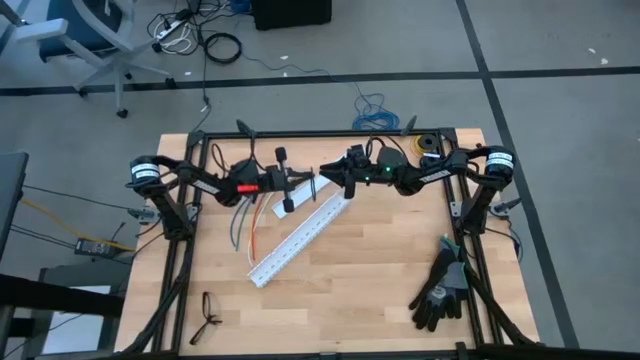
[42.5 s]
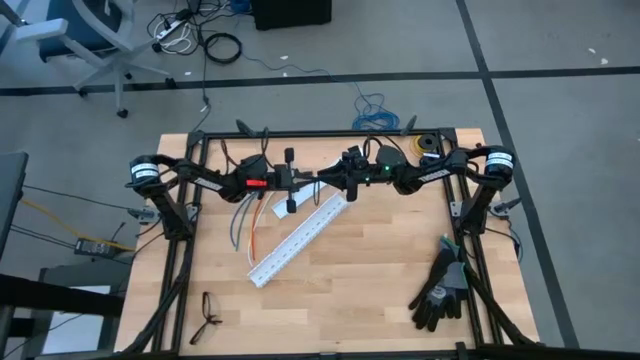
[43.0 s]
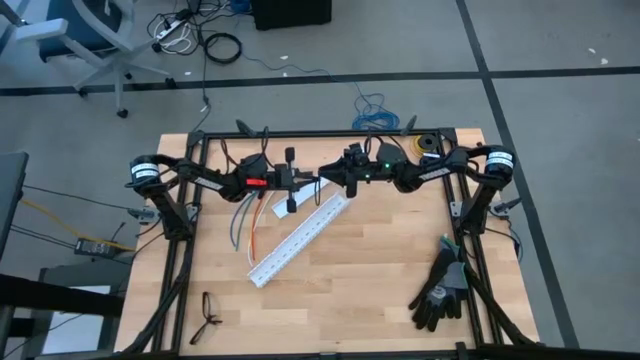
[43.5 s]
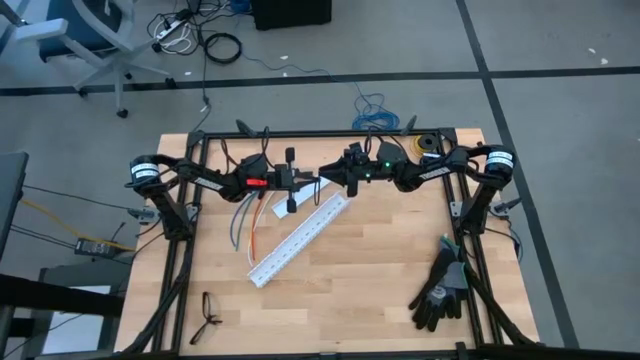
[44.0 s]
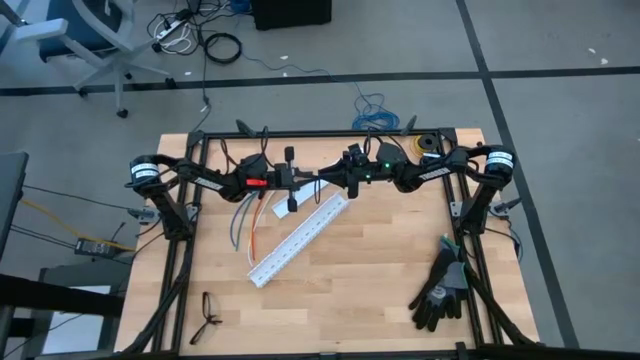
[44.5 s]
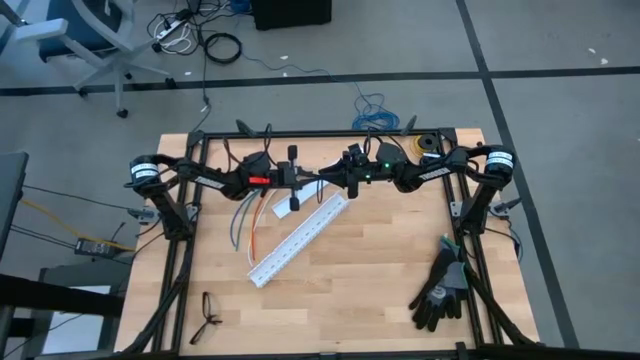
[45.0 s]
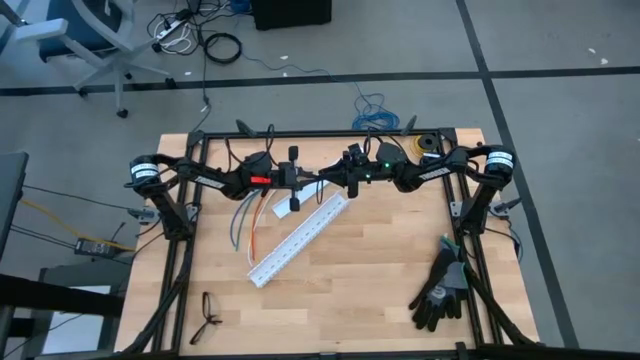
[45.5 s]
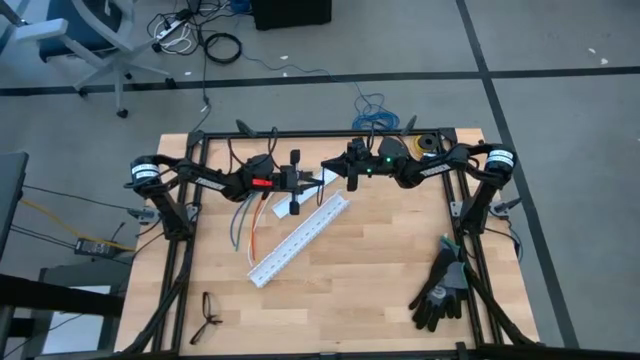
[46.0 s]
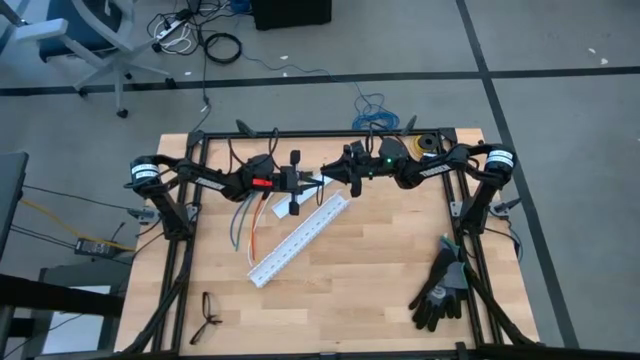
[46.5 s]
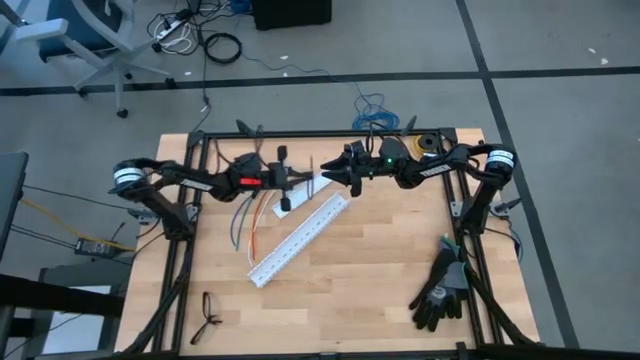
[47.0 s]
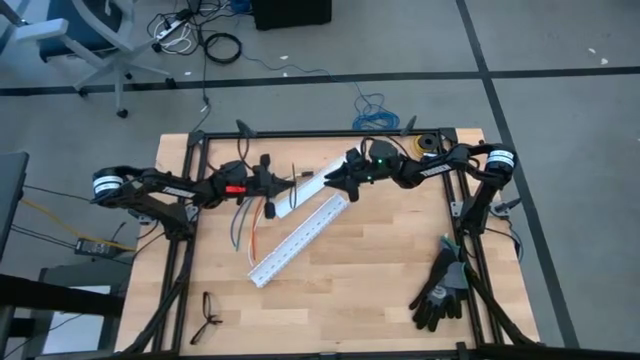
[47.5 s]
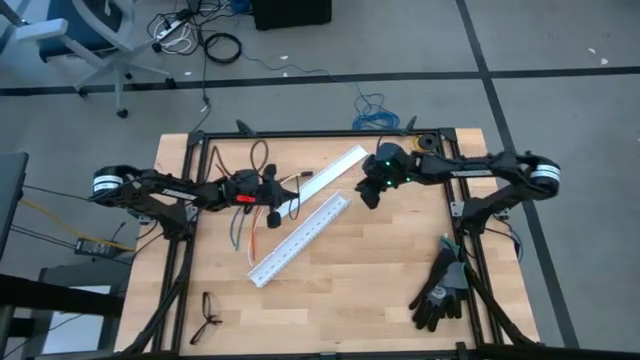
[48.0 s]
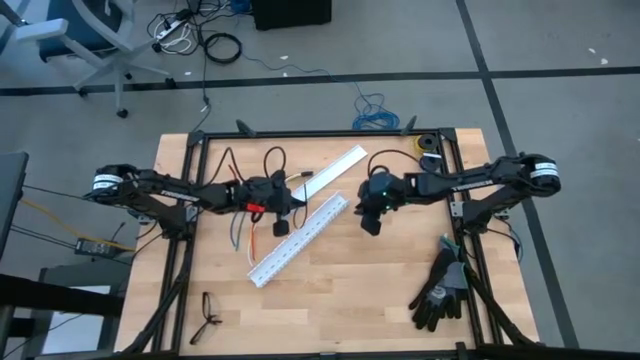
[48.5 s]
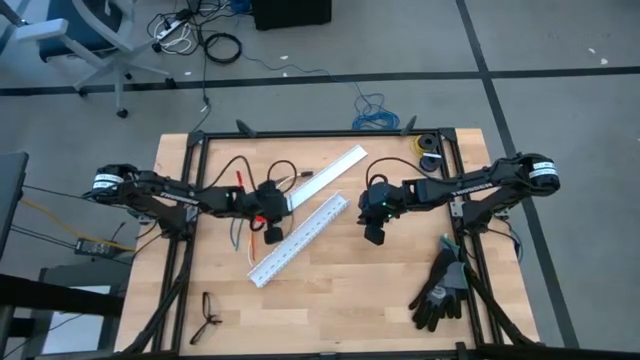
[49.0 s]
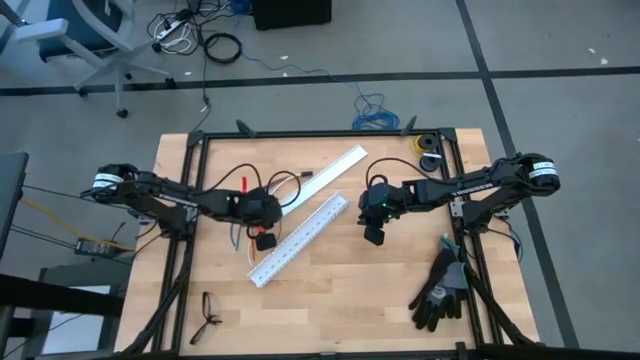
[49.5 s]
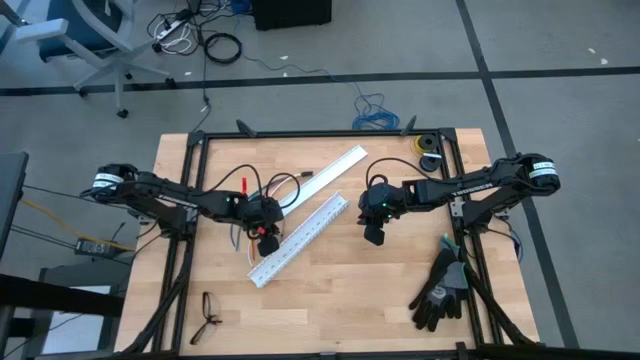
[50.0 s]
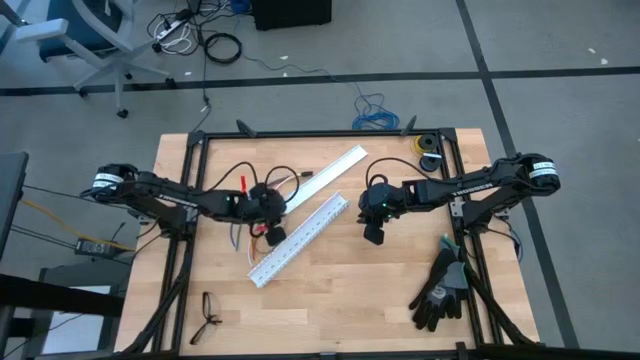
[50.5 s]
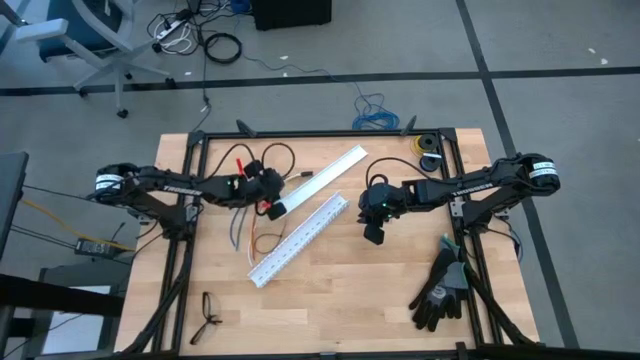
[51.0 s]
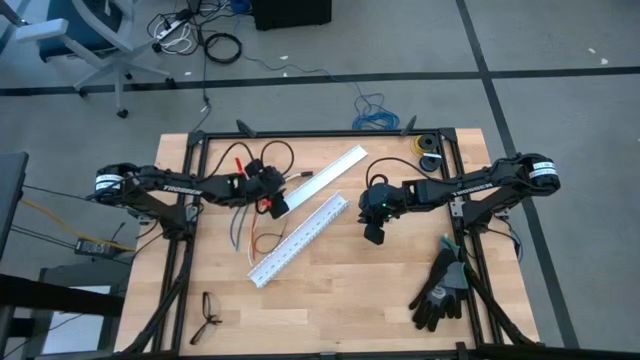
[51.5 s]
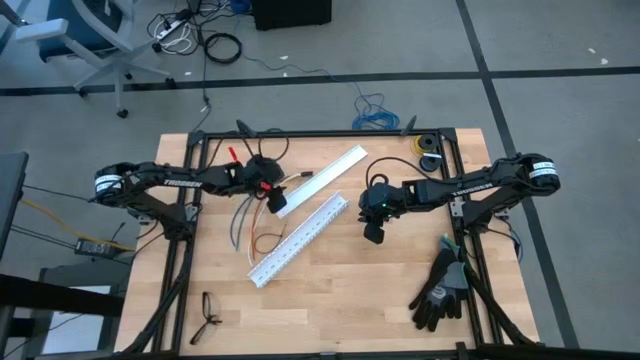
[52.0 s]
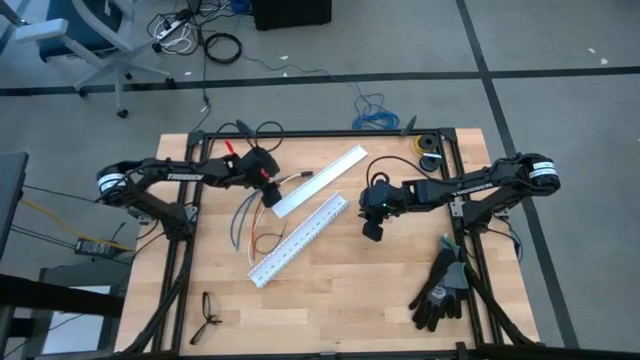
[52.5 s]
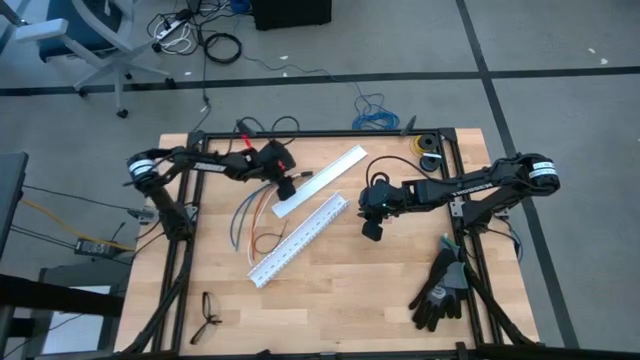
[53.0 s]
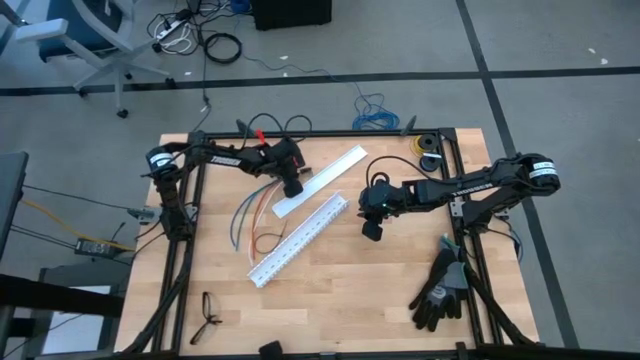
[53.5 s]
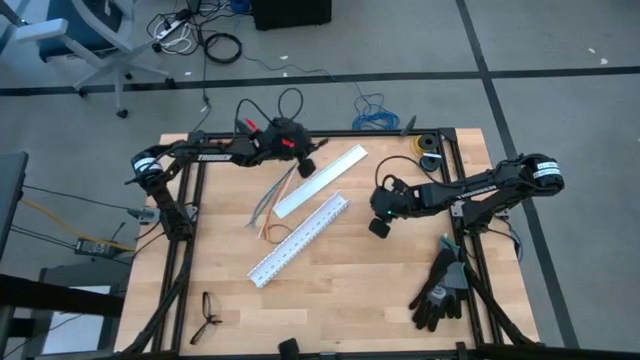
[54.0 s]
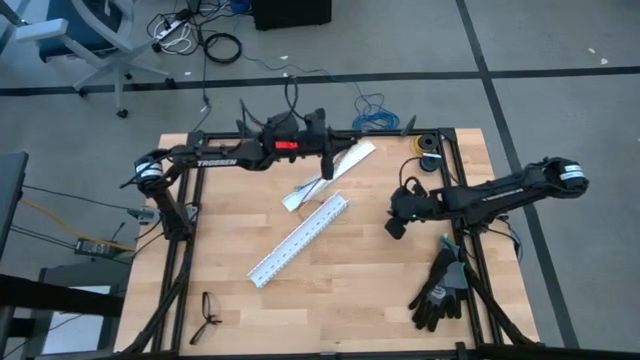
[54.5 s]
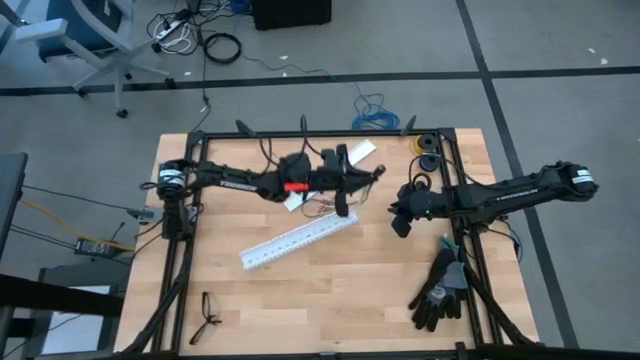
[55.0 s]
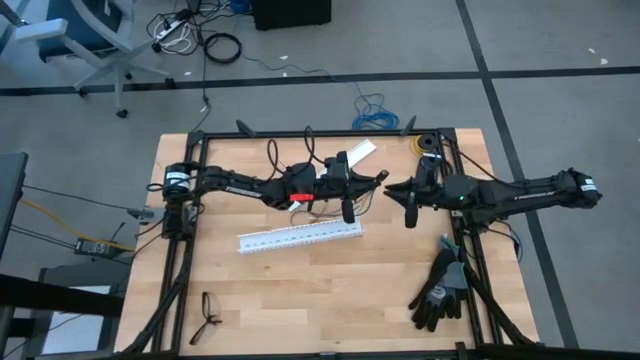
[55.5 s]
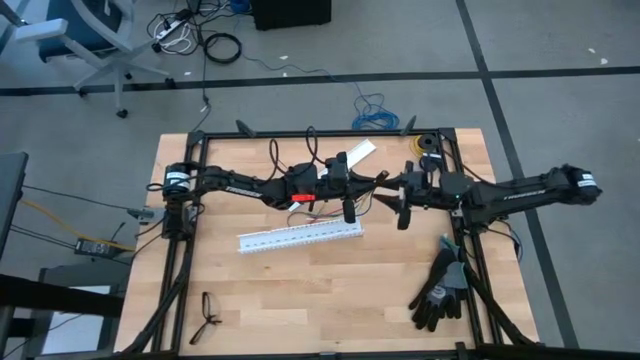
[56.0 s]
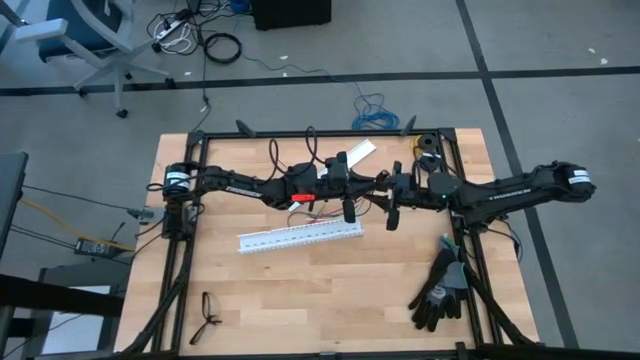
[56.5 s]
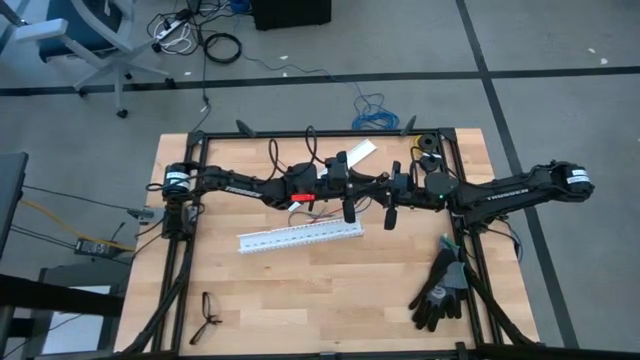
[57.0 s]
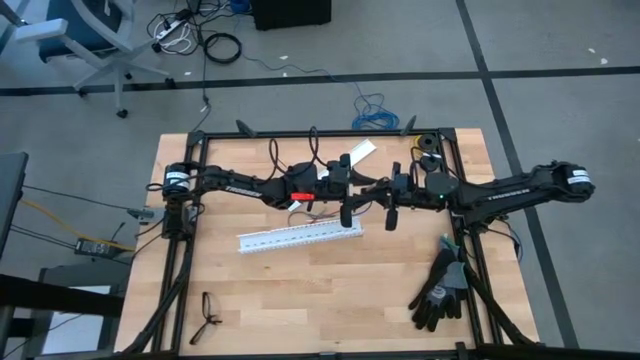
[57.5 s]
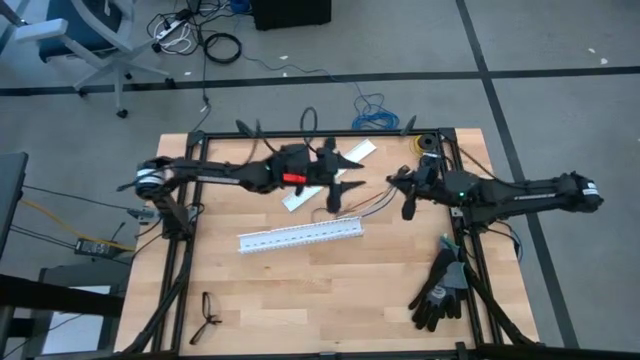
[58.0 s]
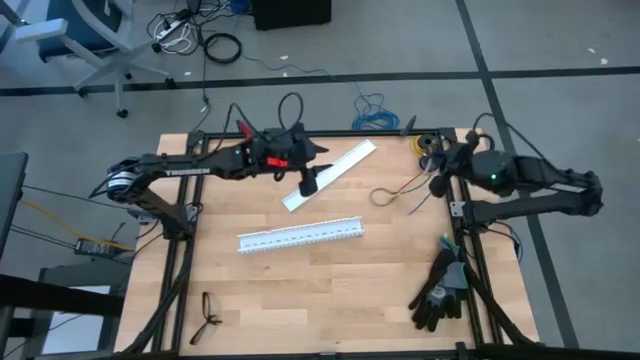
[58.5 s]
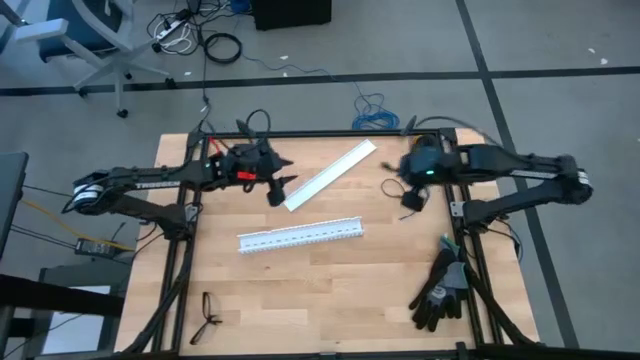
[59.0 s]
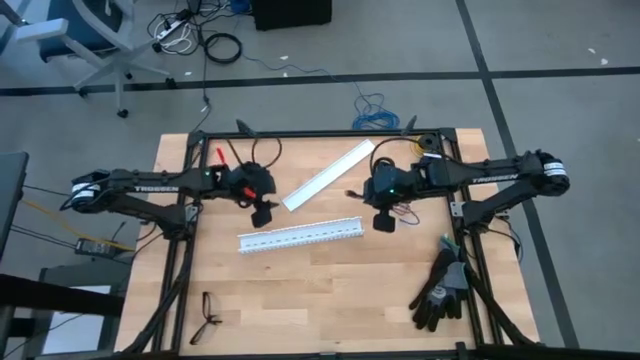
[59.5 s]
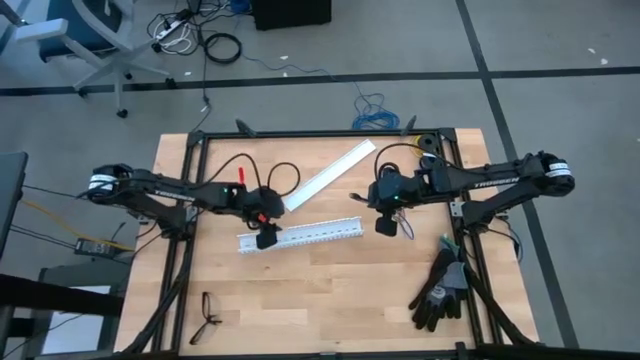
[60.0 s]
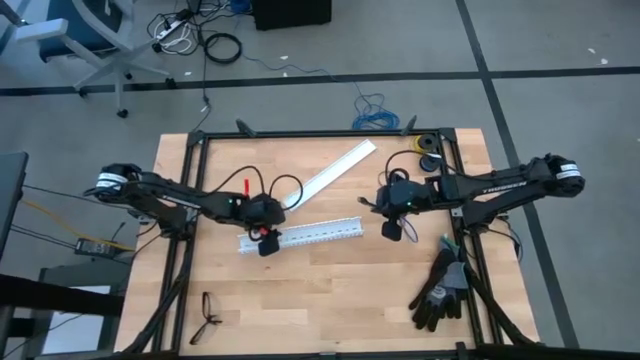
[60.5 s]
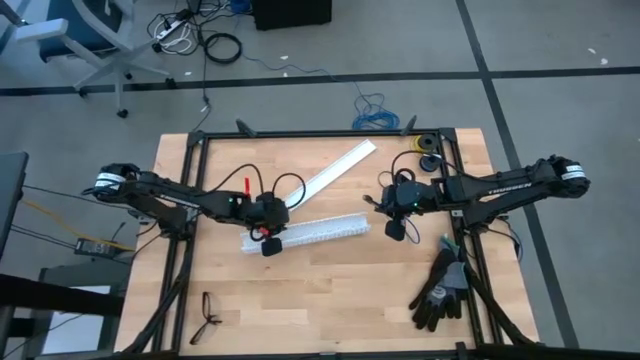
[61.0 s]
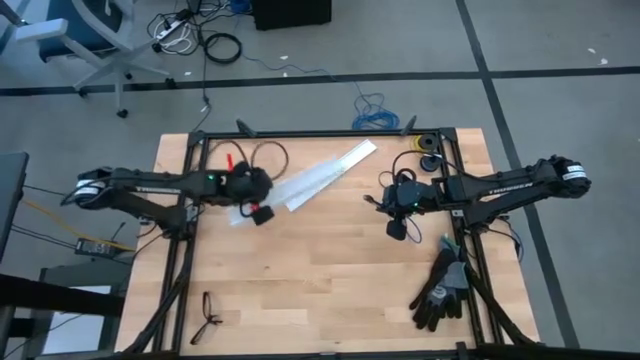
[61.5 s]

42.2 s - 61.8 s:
Task: Ziptie cables
Wrap the cable wires with the black zip tie
